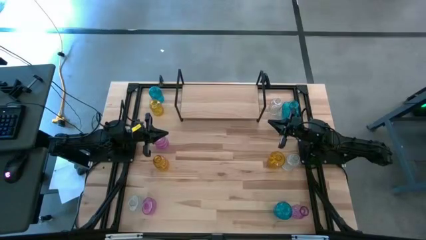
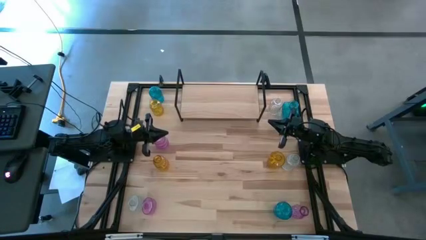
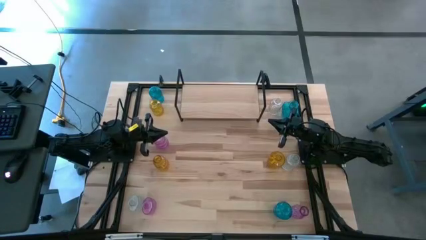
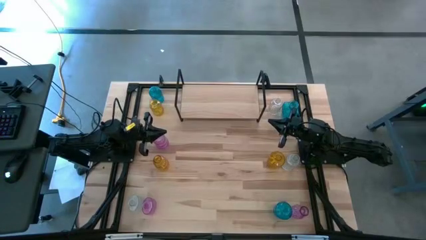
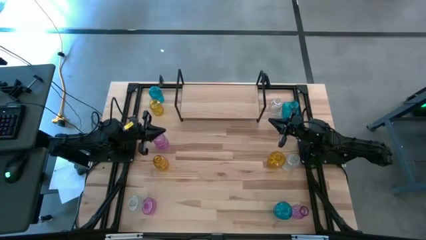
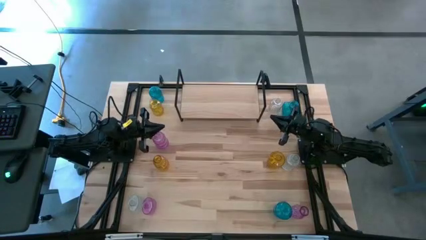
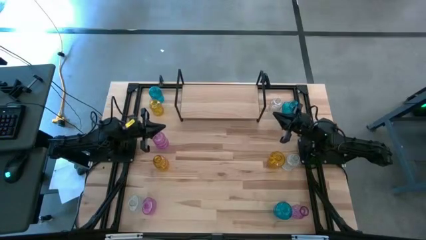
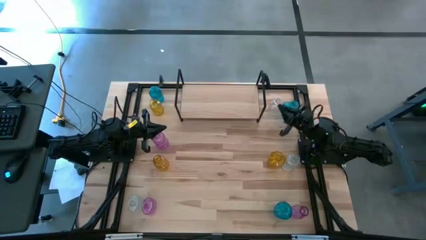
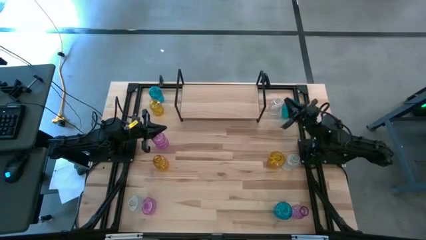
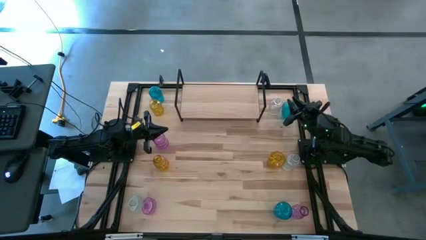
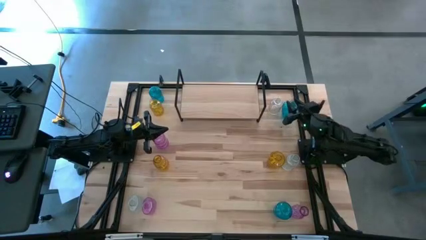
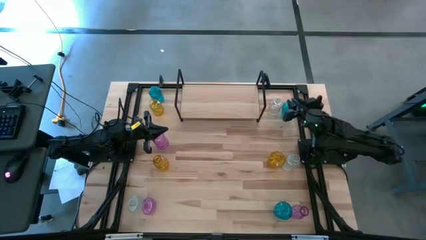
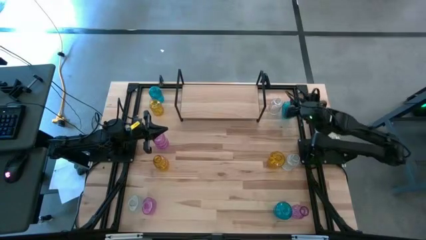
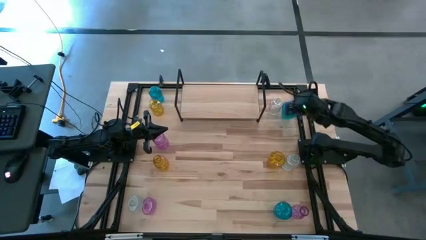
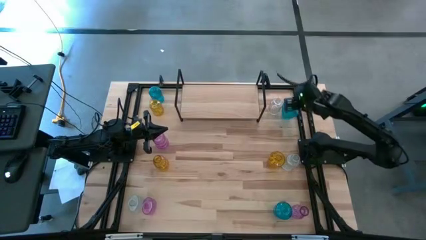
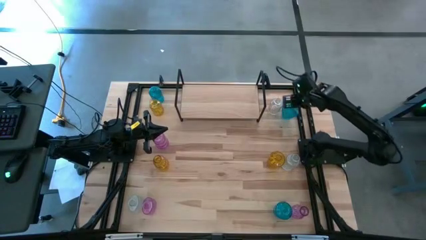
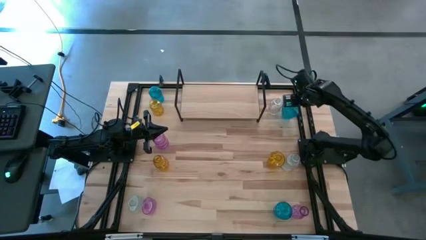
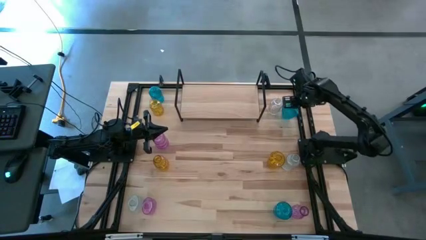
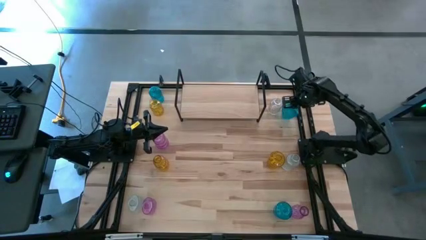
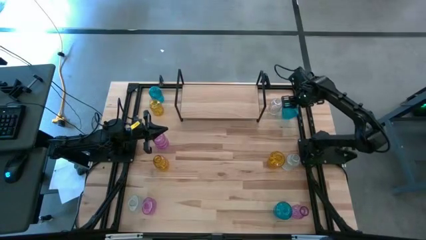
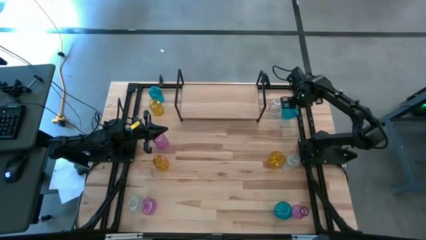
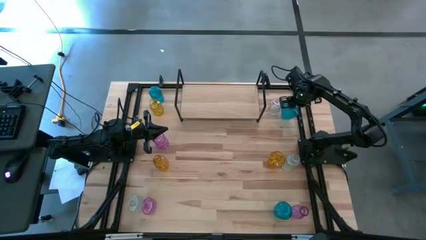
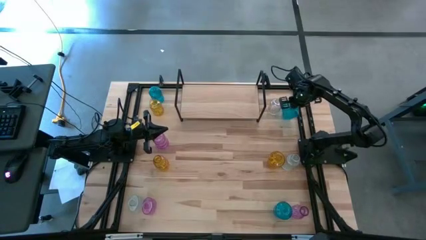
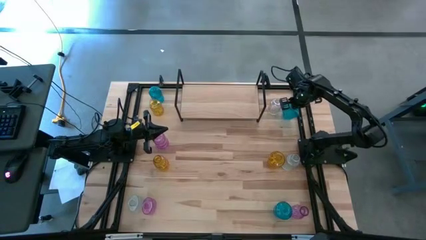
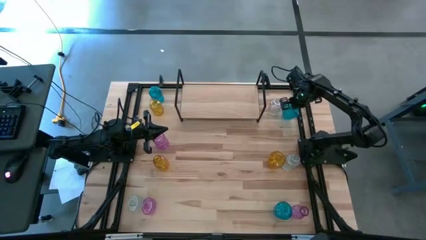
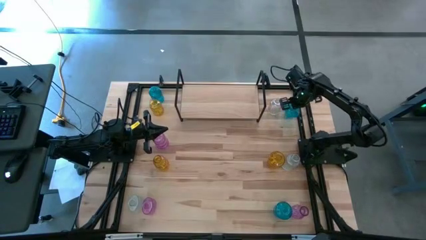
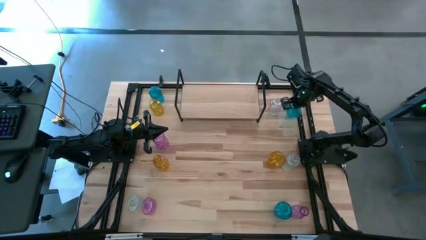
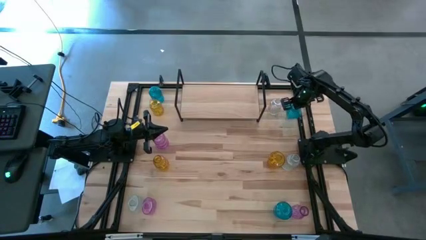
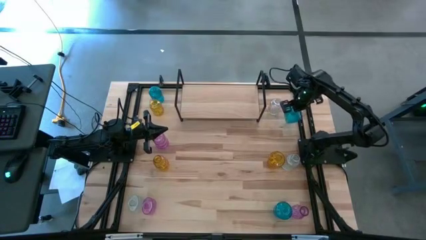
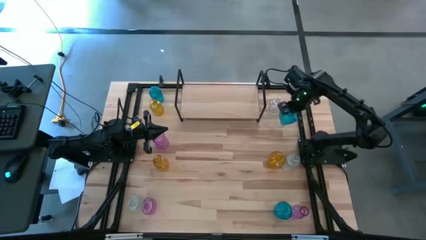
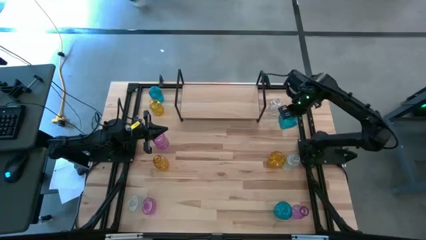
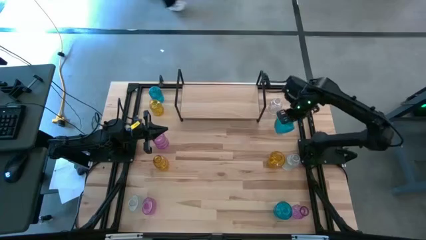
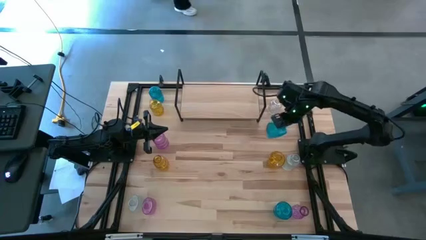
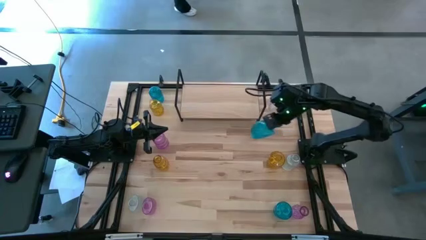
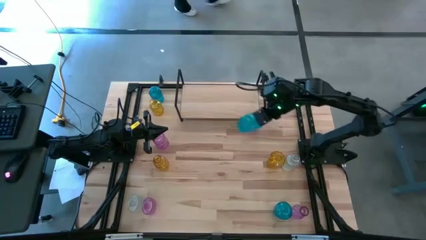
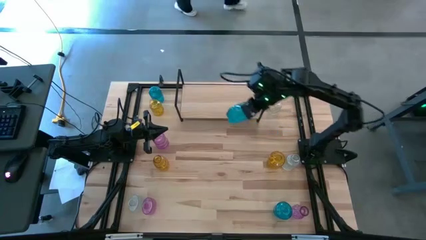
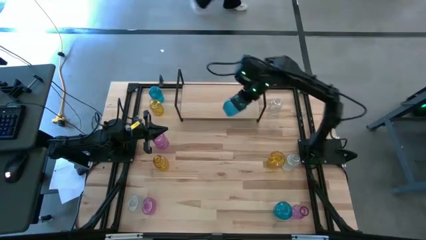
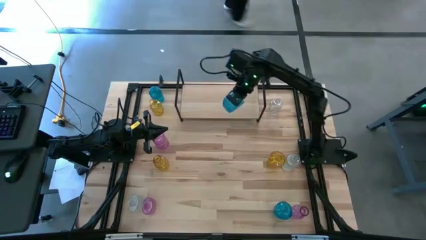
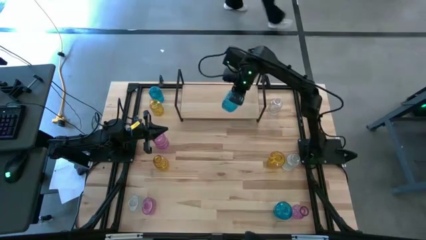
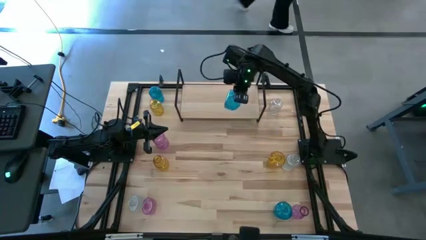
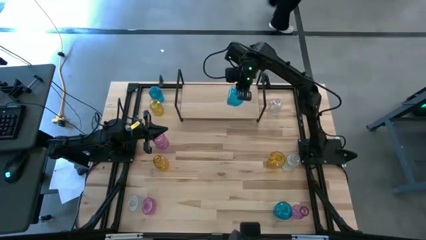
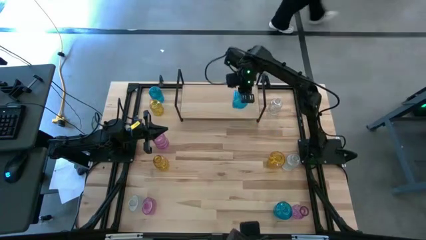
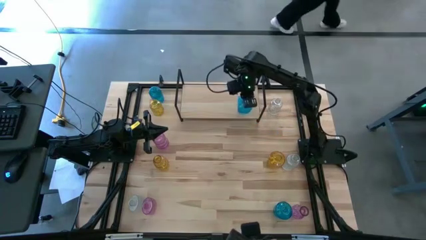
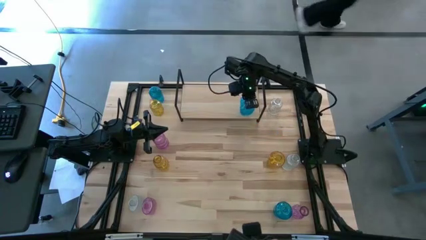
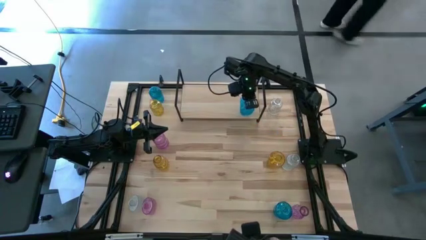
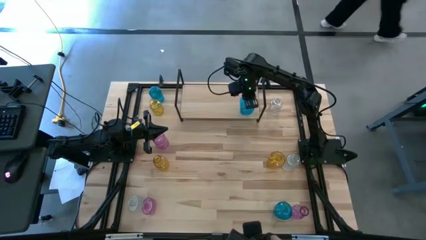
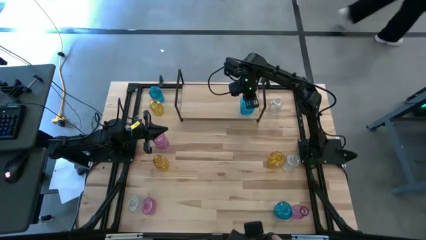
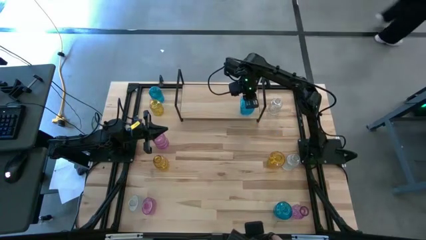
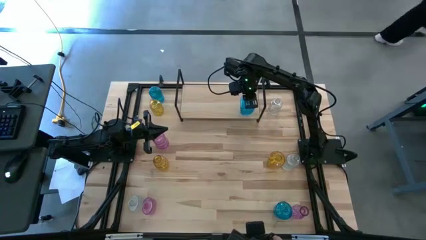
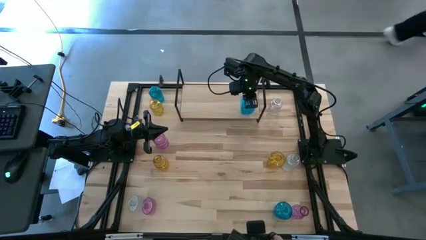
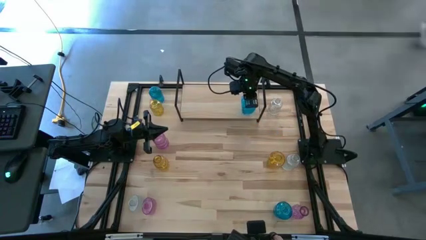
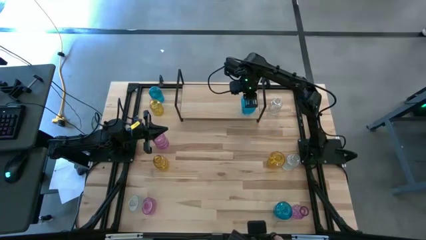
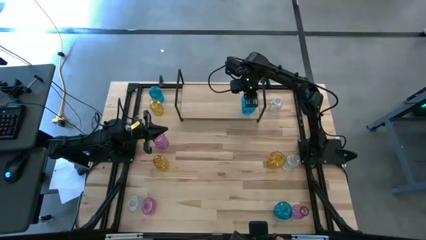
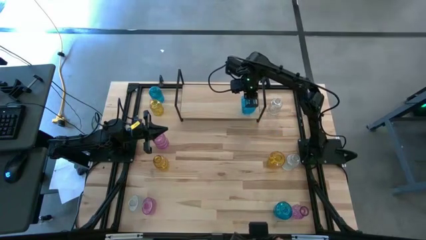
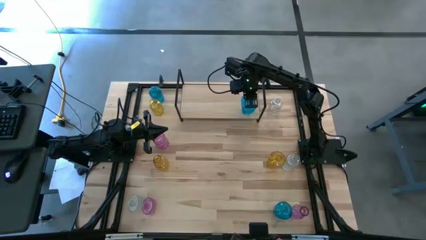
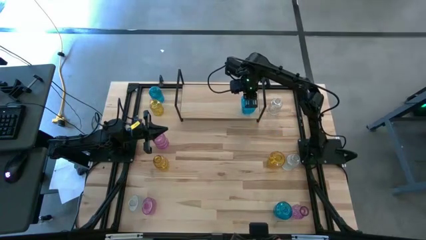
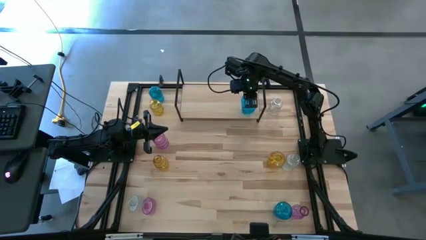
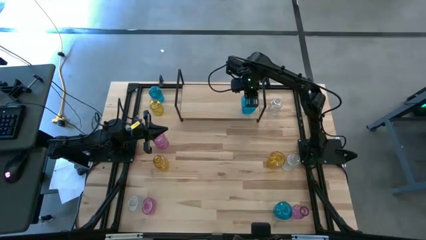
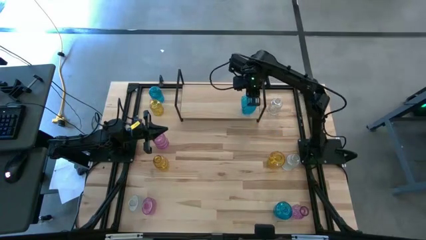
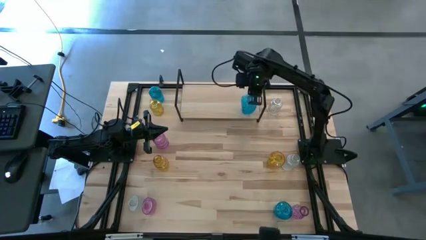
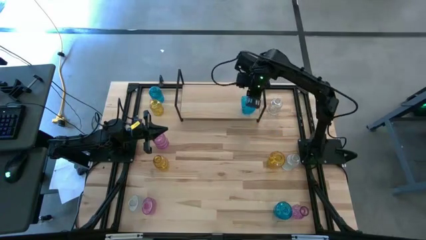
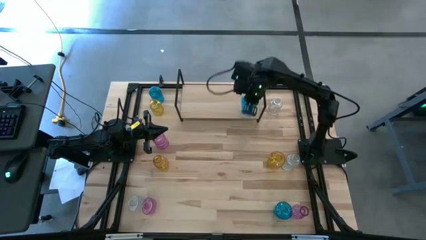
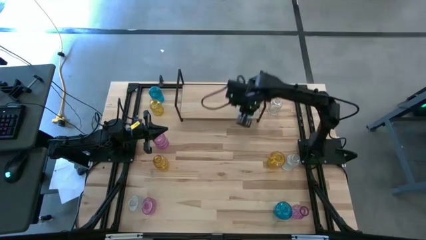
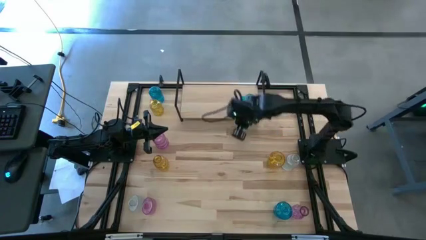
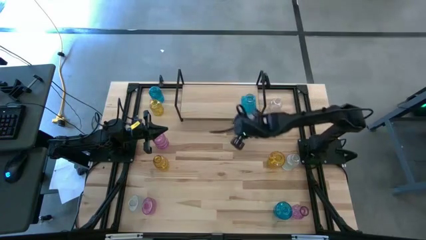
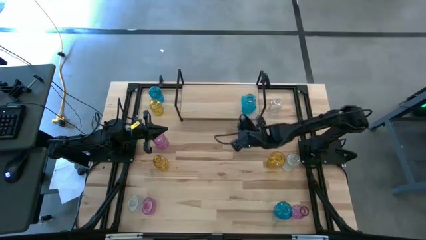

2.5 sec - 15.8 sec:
Task: sort vases onto shelf
Put the top right blue vase on the shelf

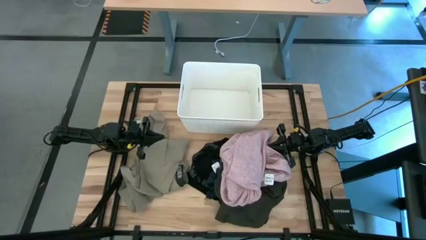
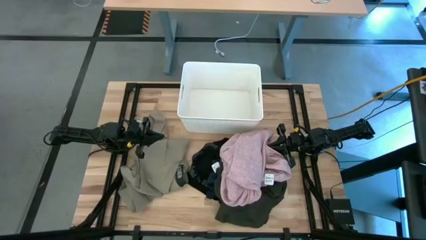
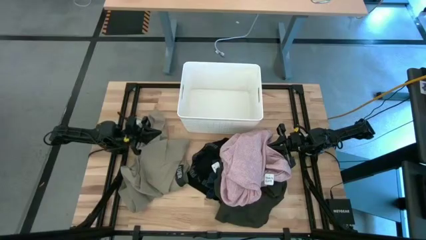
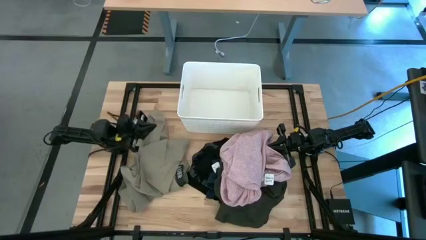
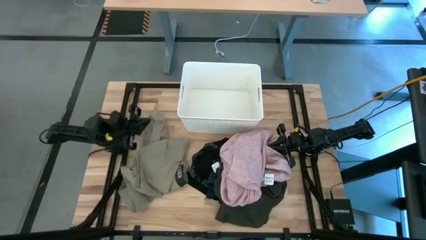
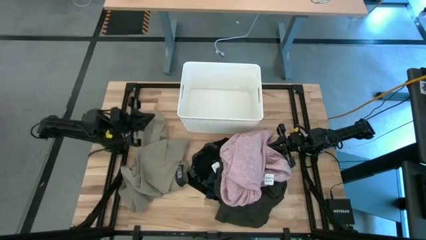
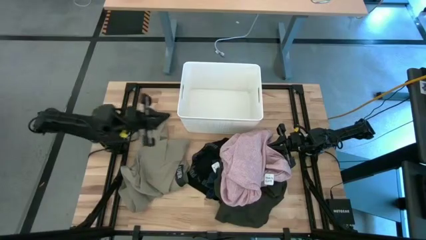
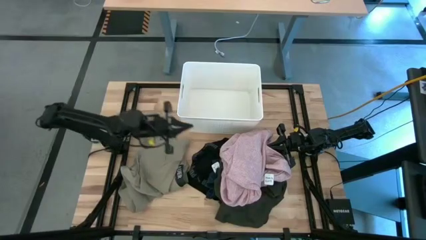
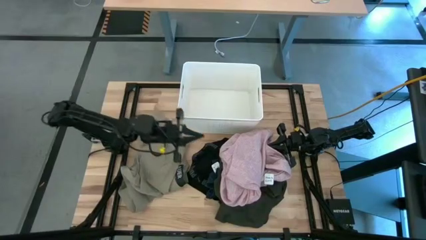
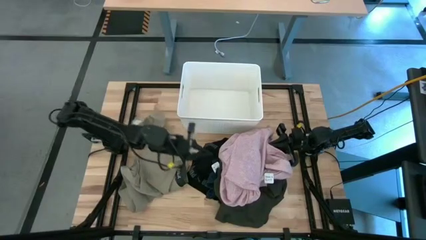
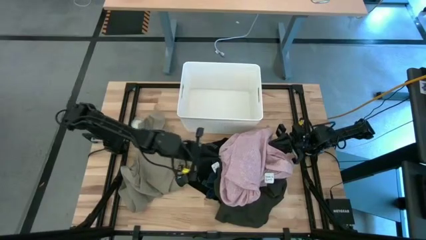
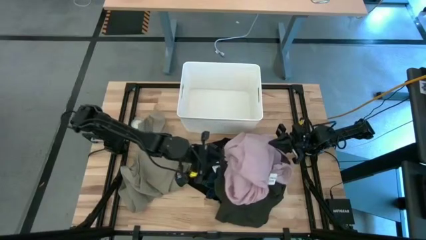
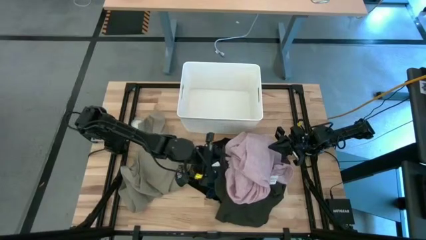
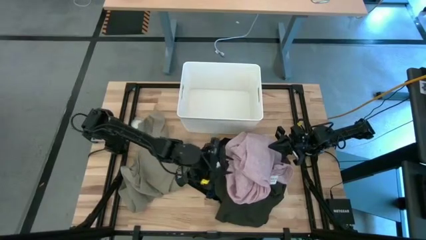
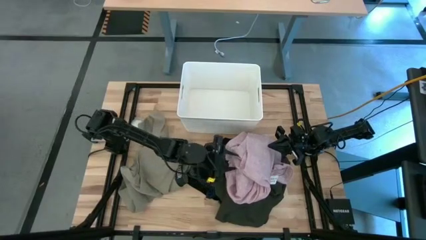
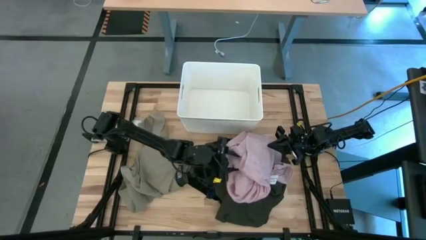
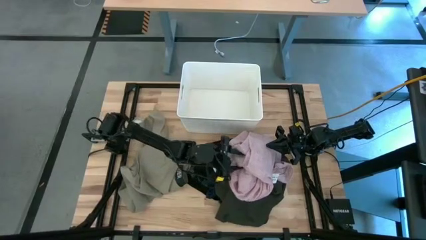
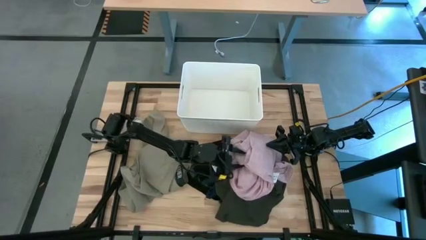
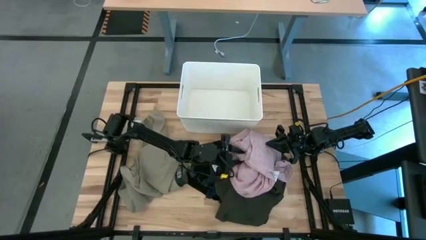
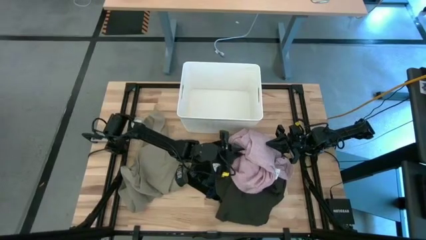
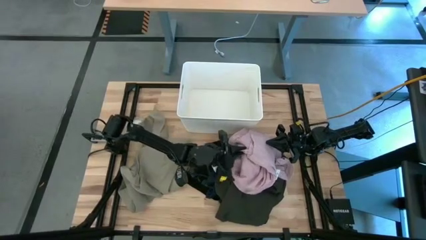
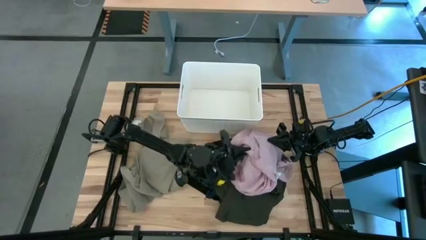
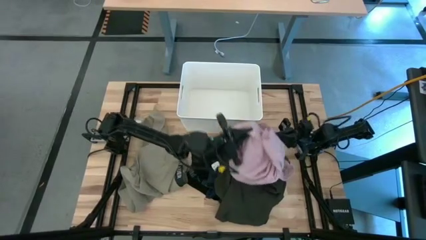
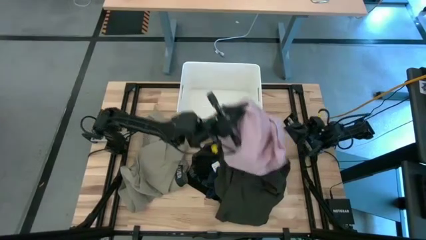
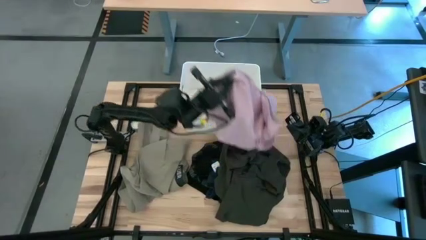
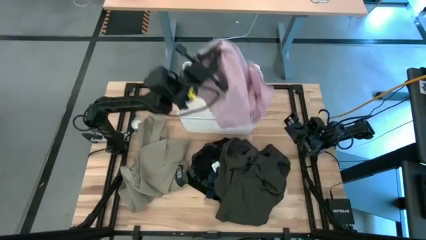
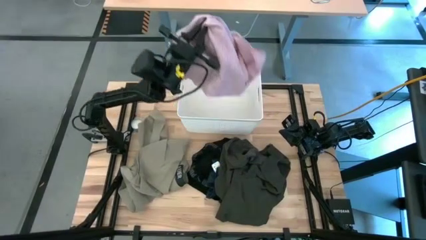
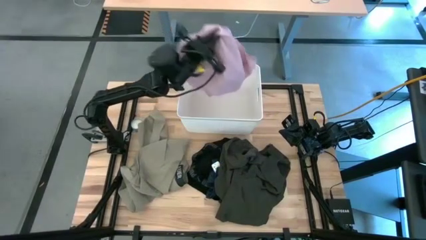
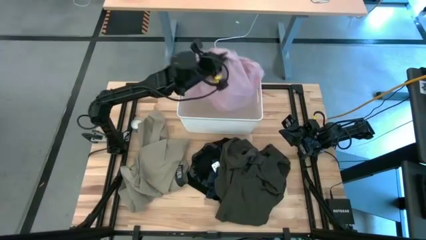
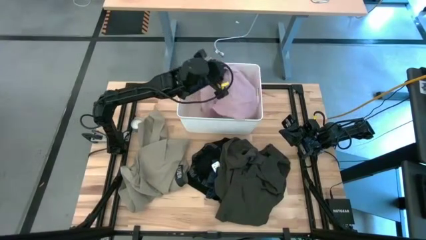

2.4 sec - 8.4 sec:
Task: Sort clothes
Put the pink polo shirt into the white laundry bin
